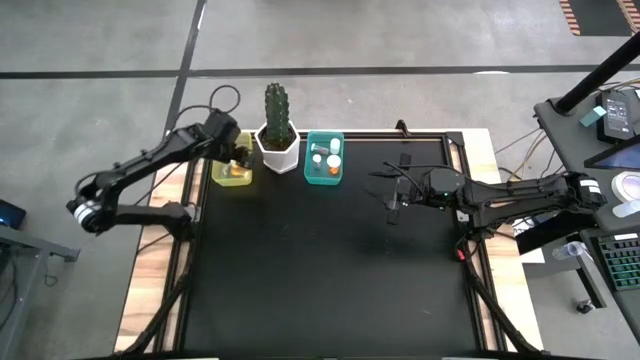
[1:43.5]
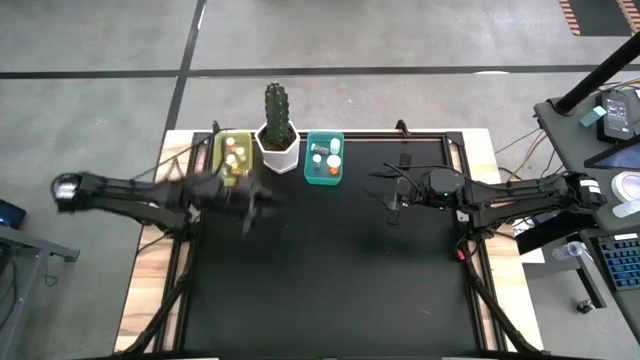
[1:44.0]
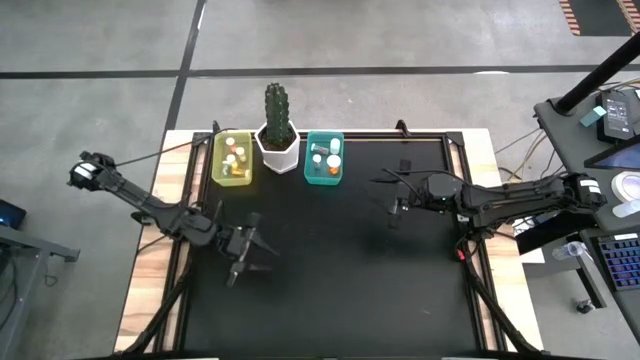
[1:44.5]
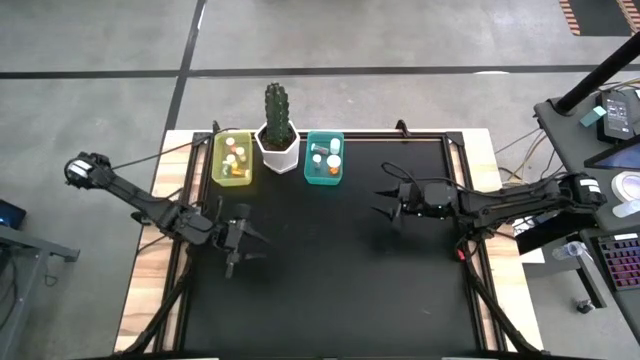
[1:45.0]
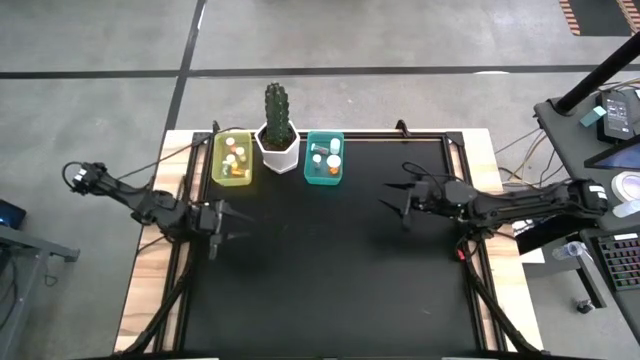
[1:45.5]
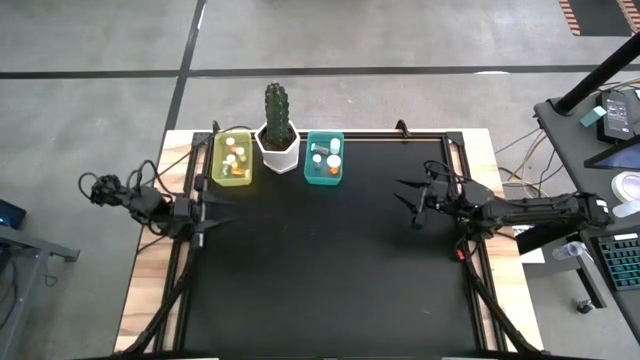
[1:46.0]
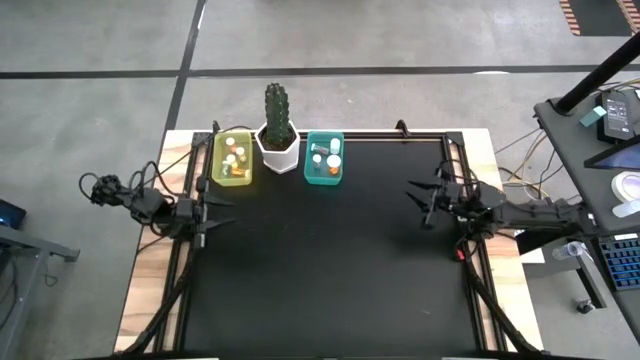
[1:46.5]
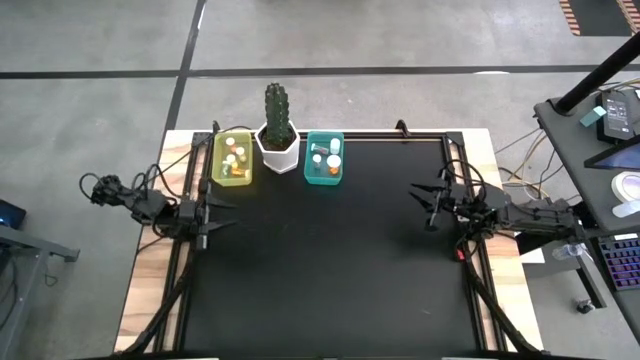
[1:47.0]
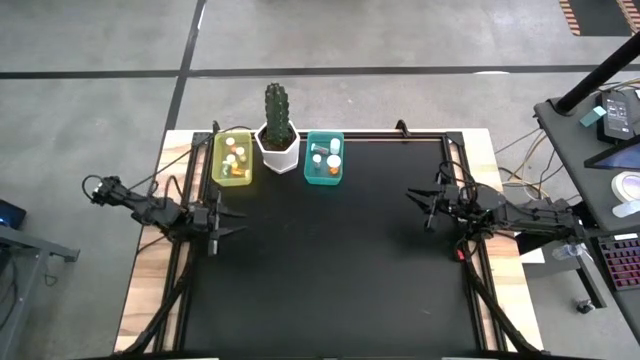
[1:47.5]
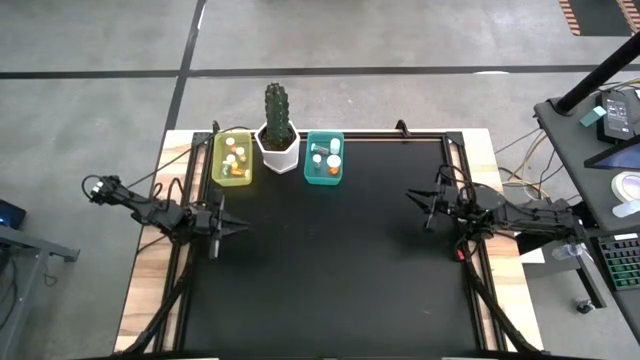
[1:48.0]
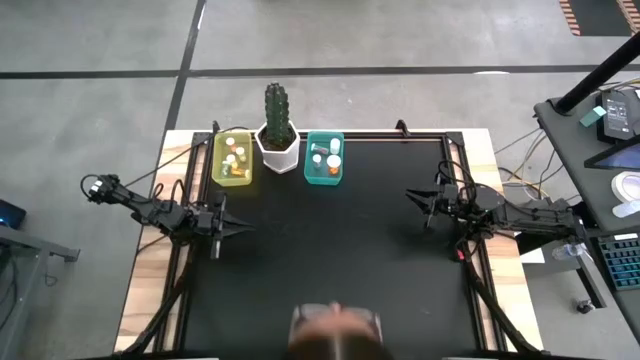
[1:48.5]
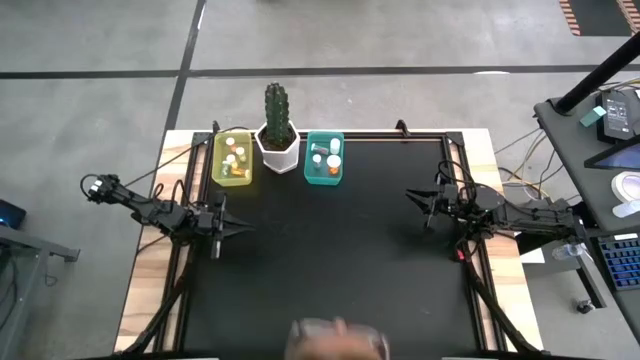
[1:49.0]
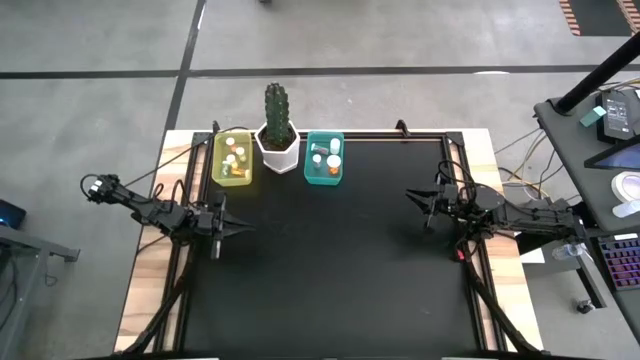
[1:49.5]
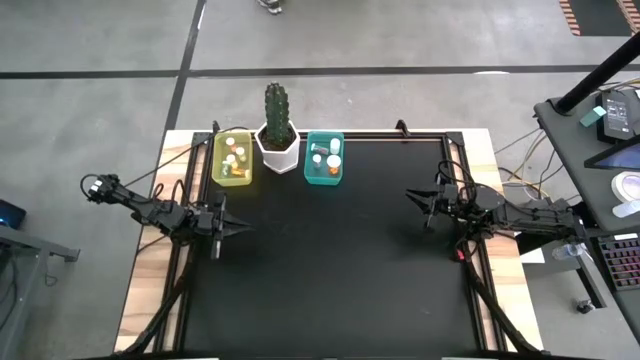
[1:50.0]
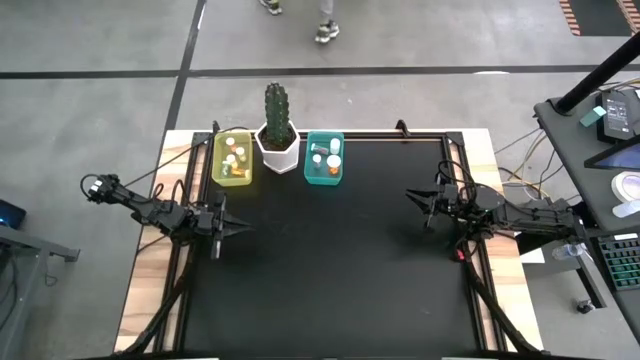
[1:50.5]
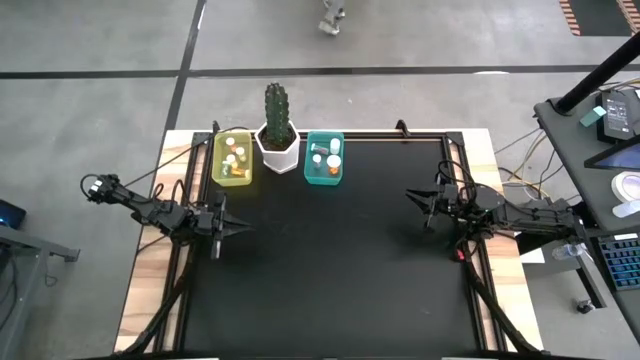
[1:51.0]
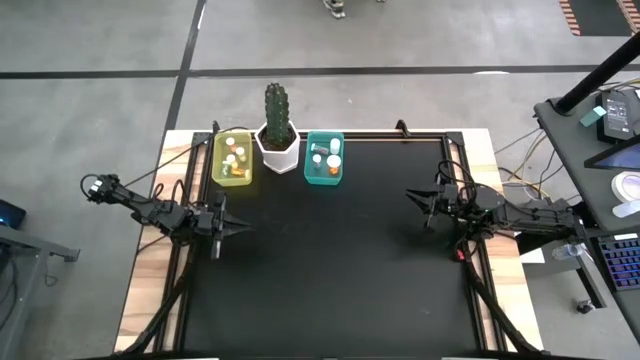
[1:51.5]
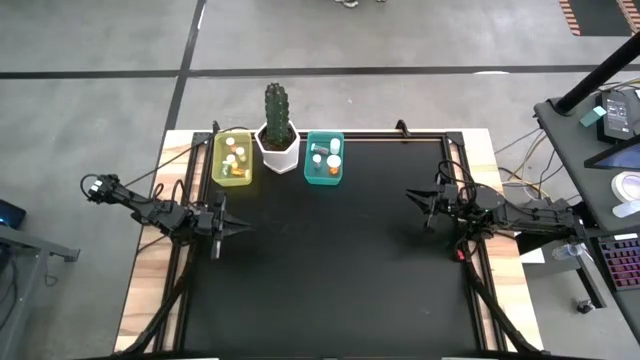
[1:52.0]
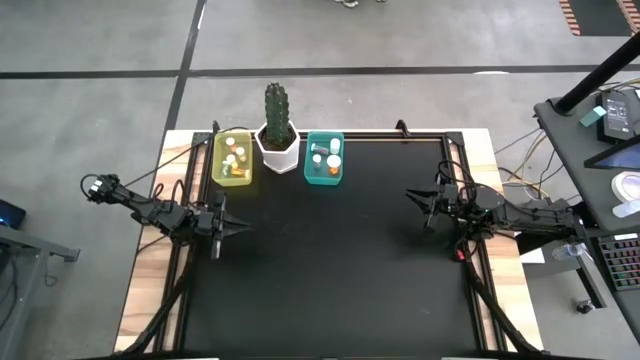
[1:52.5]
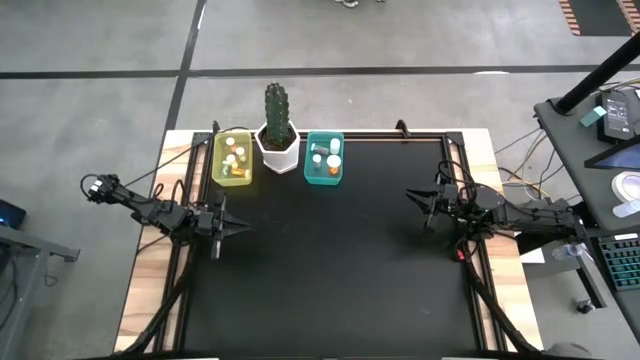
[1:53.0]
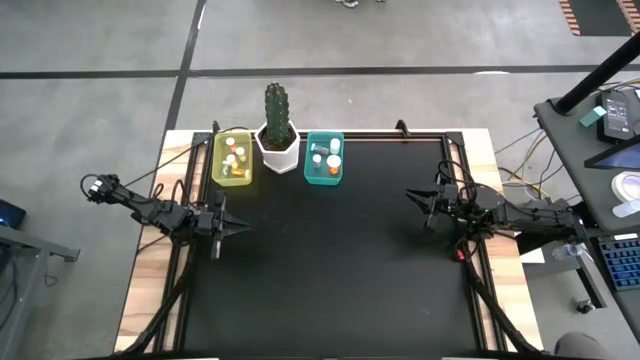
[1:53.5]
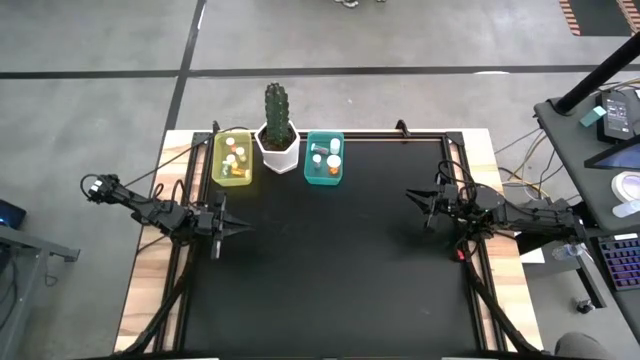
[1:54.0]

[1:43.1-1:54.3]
Task: Pick and place medicine bottles into bin by pill shape (circle, oval)
Return to Home Position

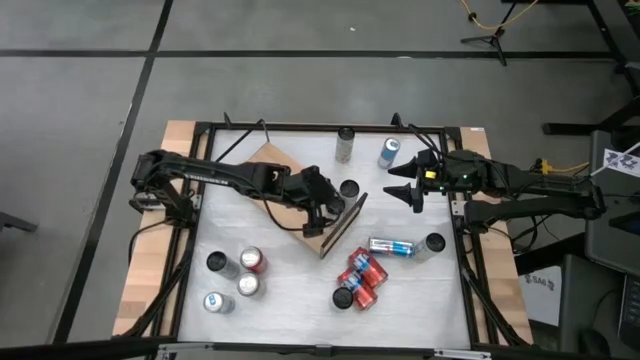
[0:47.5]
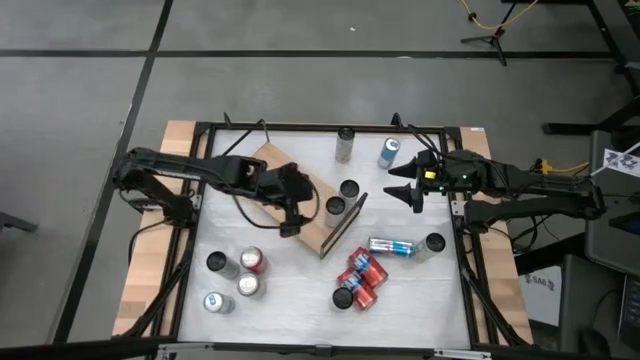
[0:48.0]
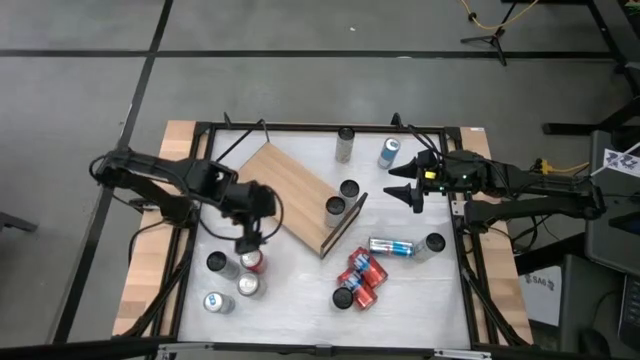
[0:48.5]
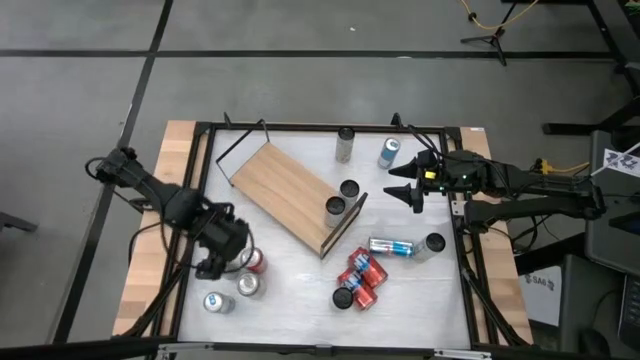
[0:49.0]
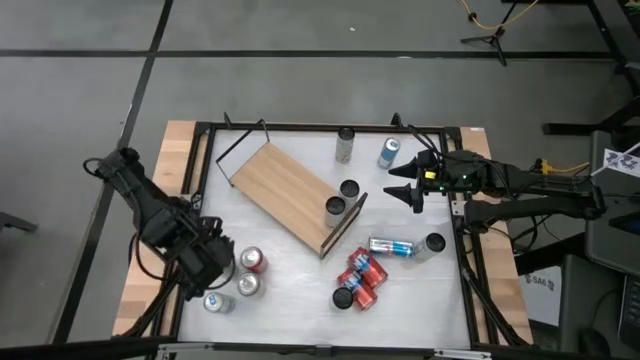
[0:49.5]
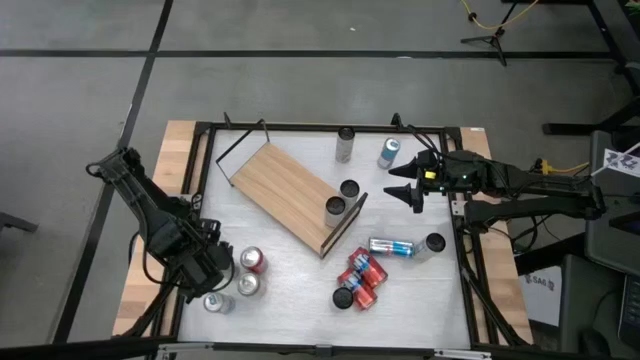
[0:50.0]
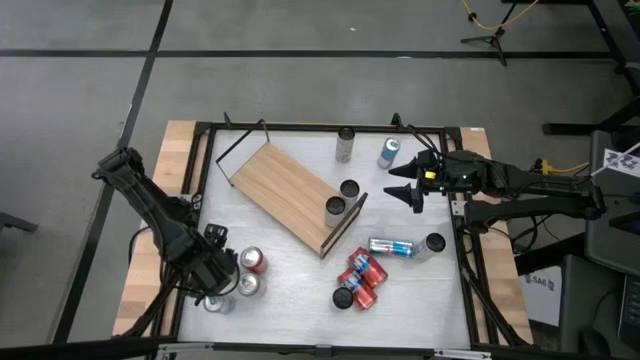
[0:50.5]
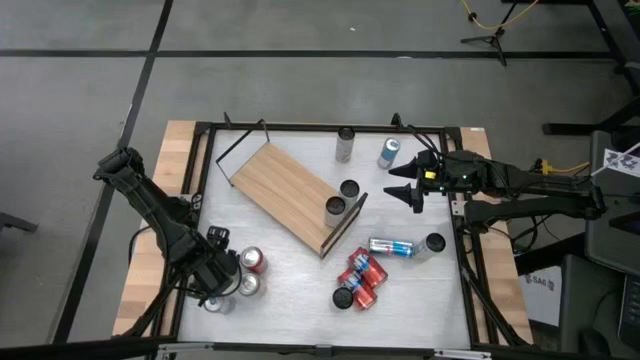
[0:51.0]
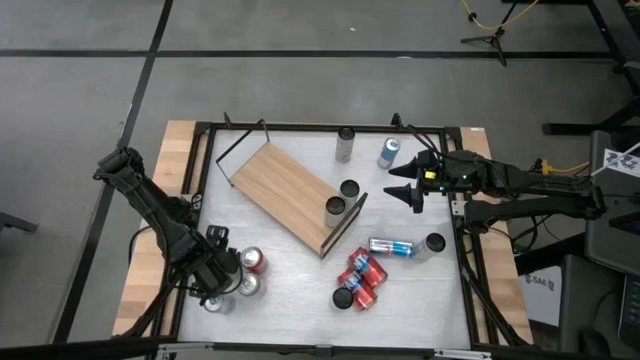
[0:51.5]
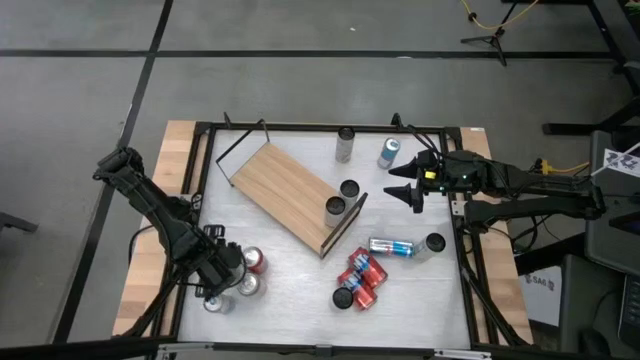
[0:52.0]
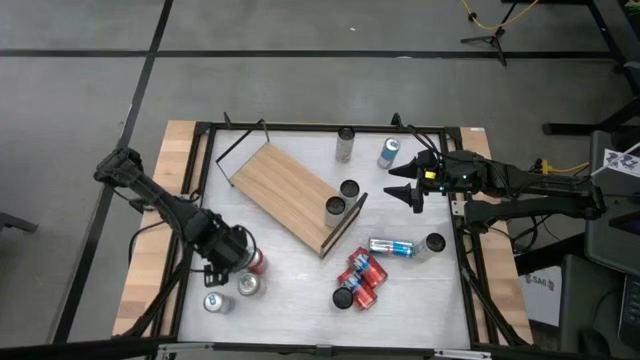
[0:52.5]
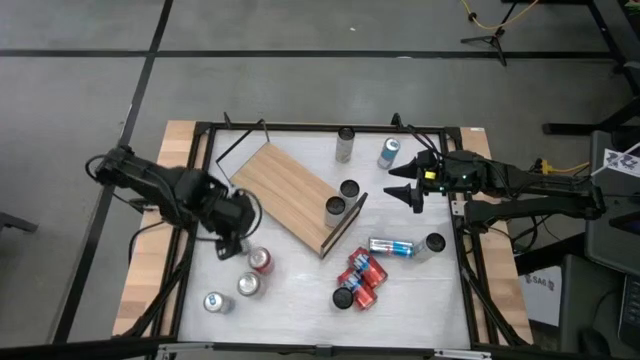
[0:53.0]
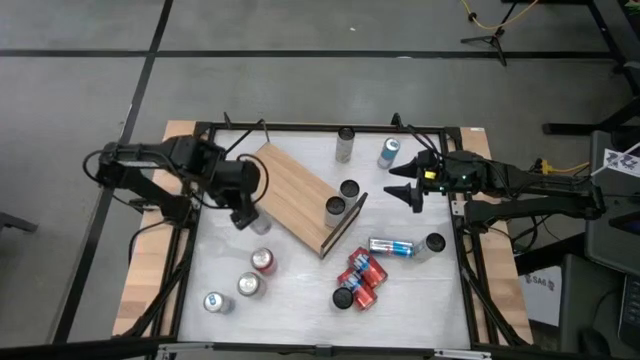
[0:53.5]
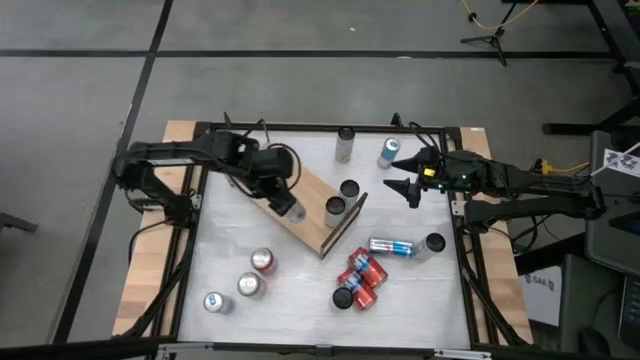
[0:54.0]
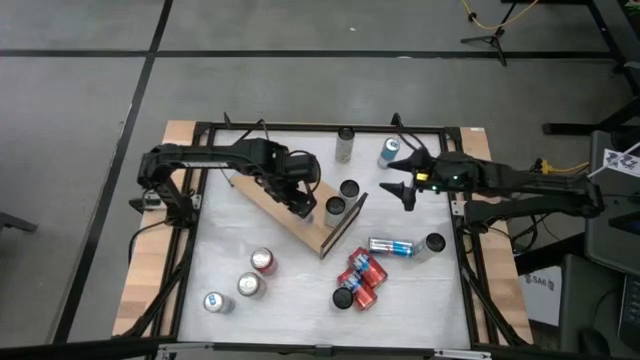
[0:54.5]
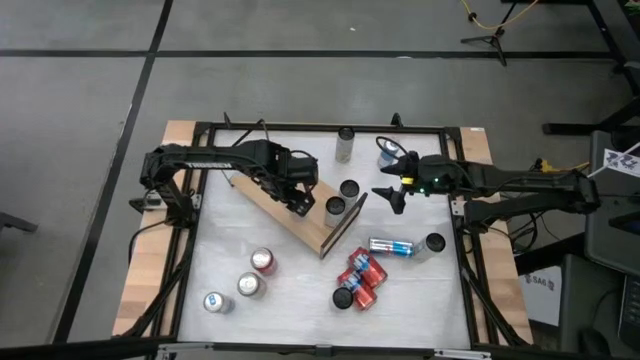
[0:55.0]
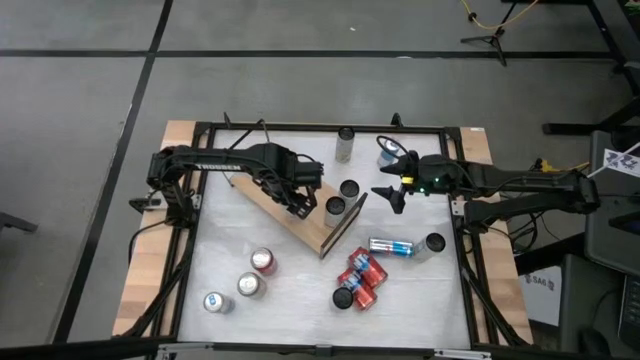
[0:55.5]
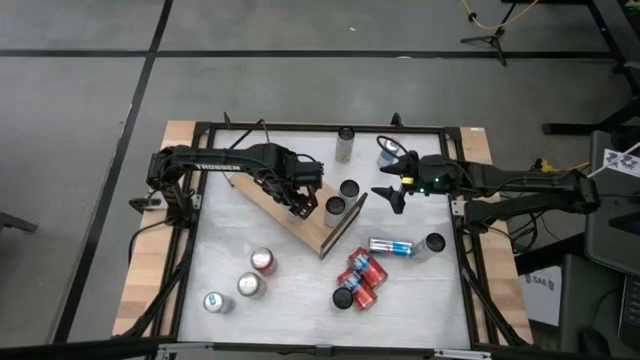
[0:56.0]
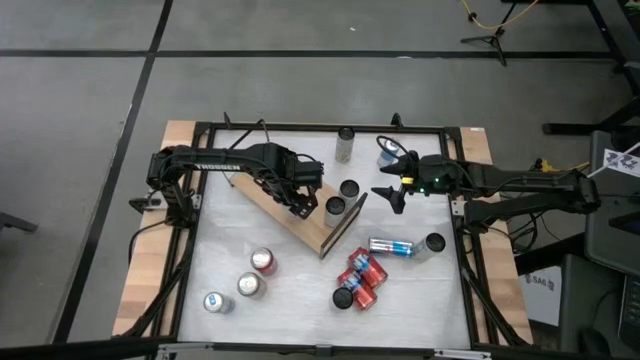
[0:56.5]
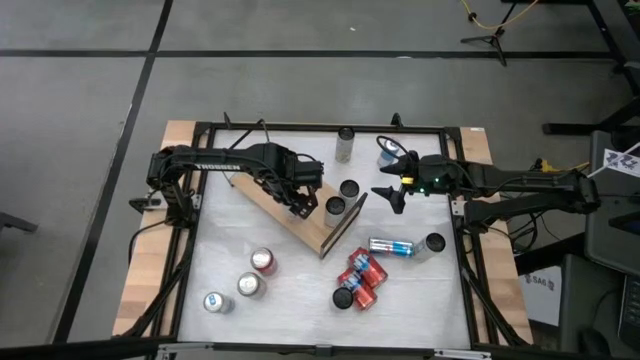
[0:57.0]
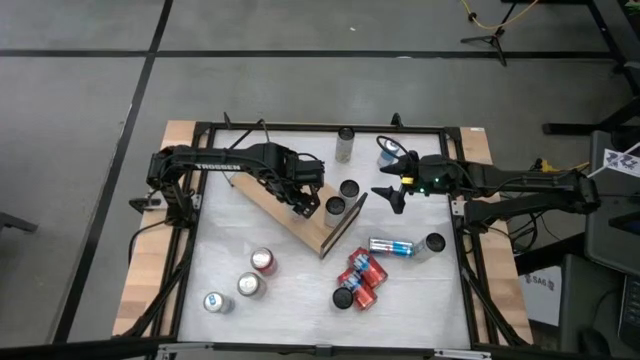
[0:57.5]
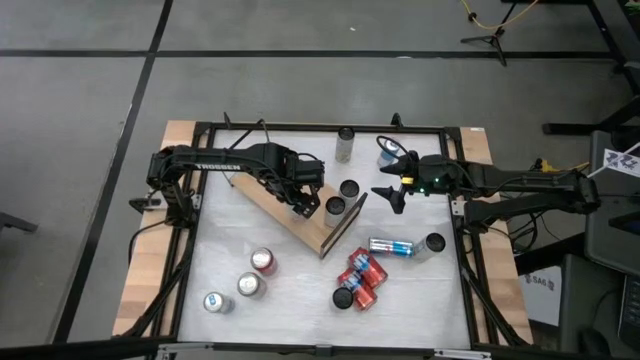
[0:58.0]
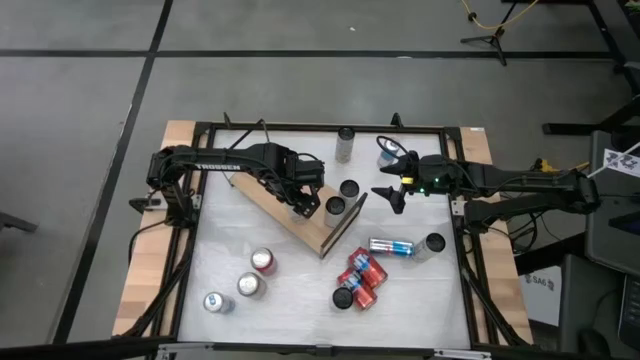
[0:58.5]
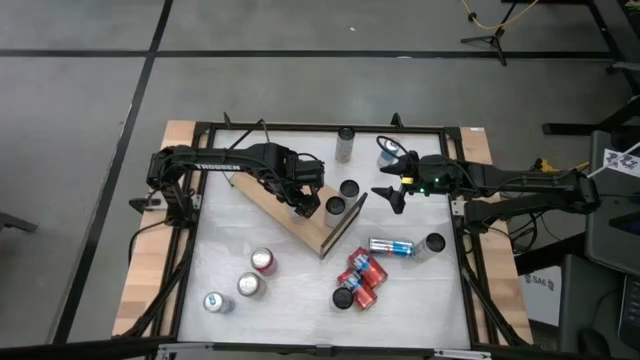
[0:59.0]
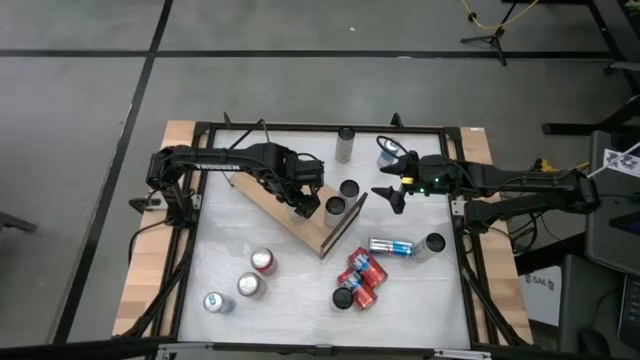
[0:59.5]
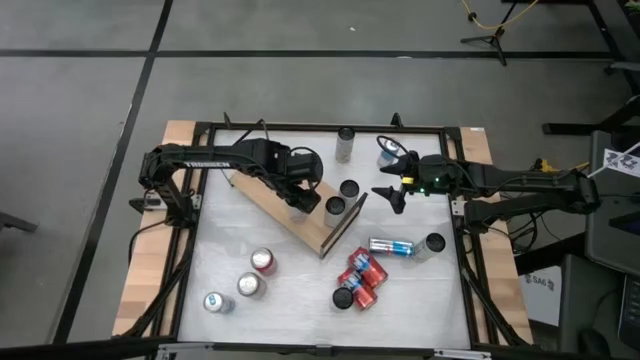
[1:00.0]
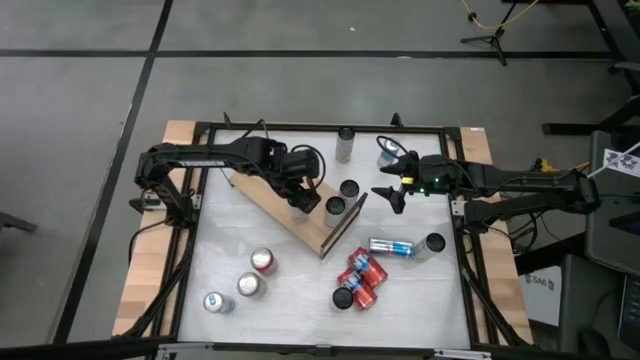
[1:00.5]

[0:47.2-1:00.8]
Task: Place canned beverage on shelf
Put the white-pink soda can on the shelf aligned with the other white-pink soda cans
